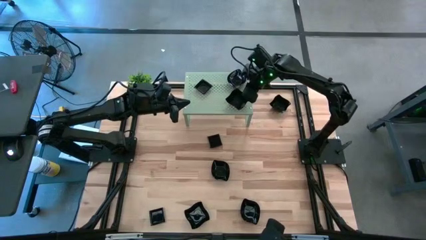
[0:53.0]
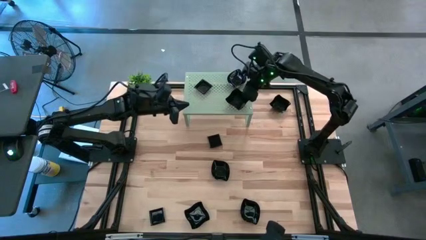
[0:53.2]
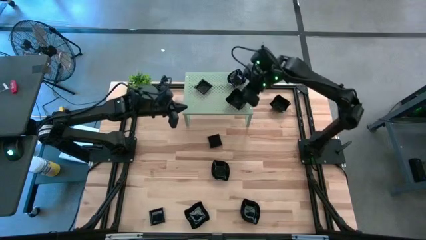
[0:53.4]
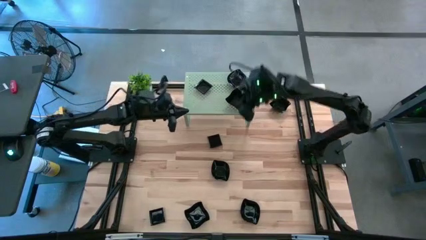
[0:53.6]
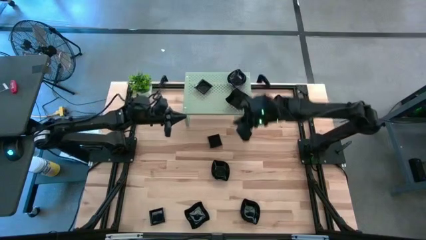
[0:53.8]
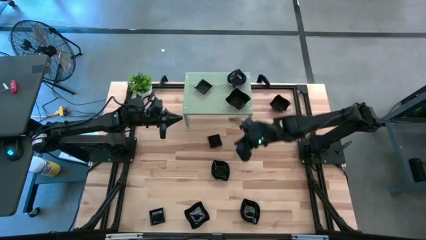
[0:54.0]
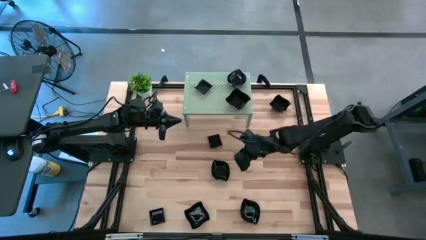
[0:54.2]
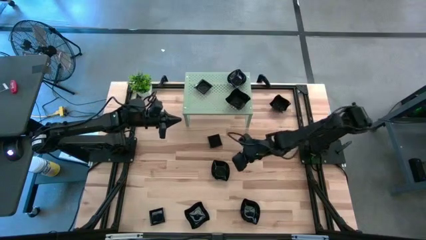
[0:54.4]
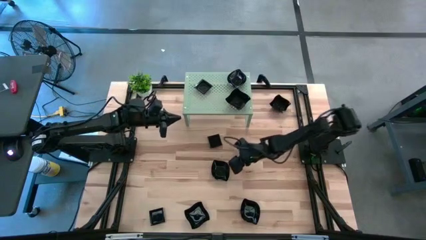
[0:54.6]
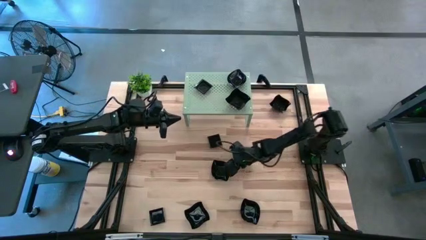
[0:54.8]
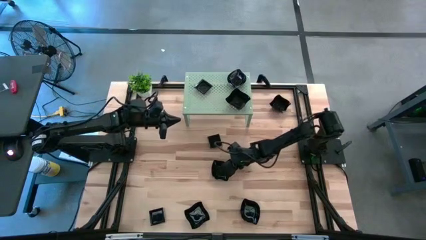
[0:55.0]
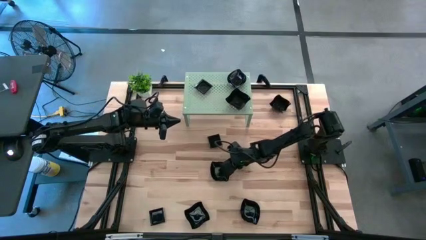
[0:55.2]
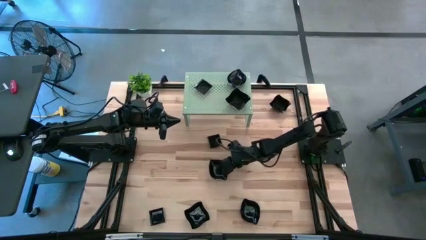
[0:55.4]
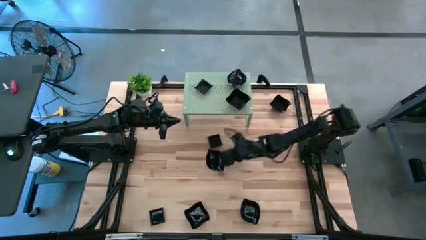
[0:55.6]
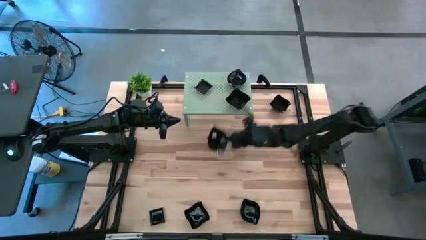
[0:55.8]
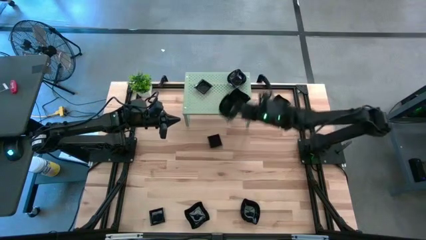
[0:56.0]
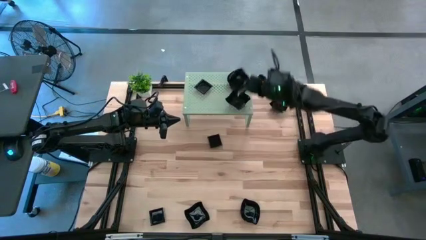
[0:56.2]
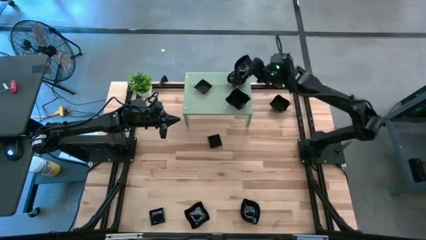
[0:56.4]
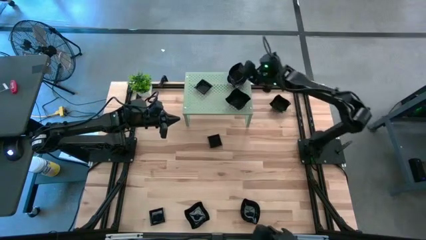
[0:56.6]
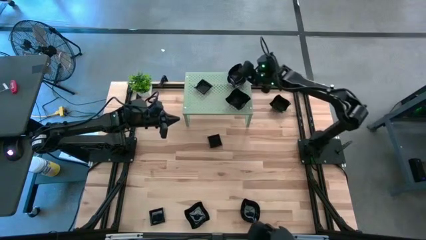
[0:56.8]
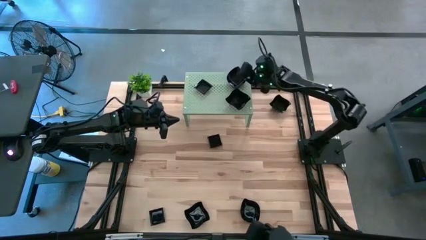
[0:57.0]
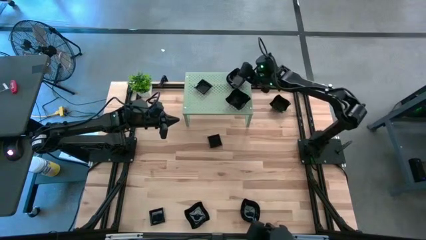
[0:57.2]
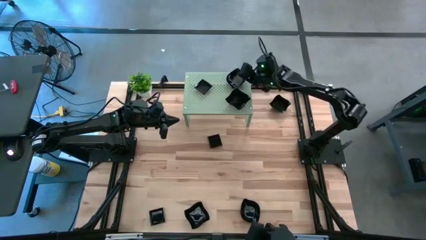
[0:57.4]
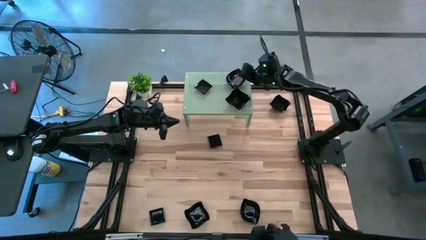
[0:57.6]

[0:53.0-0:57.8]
Task: Pick & Place Mini shaped plates
Stack the black leaf-shaped plate on top of the black leaf-shaped plates on the shelf

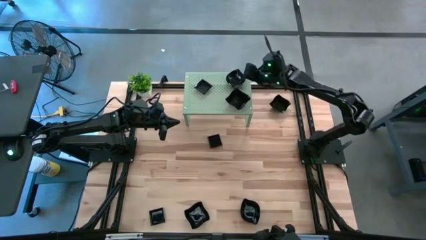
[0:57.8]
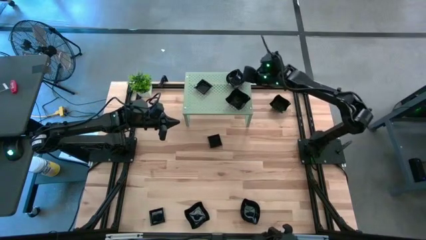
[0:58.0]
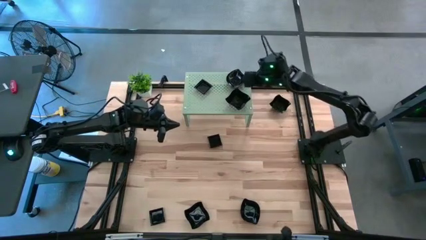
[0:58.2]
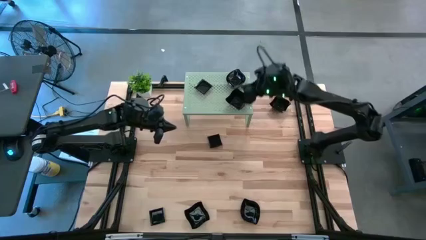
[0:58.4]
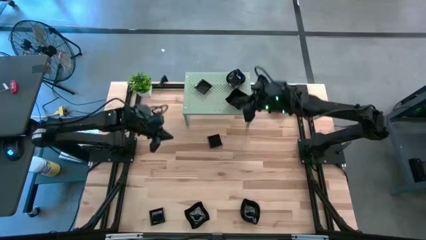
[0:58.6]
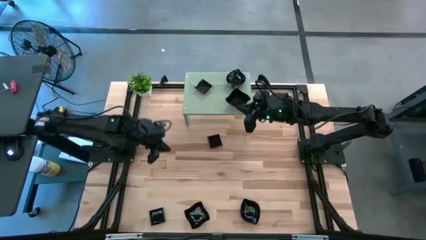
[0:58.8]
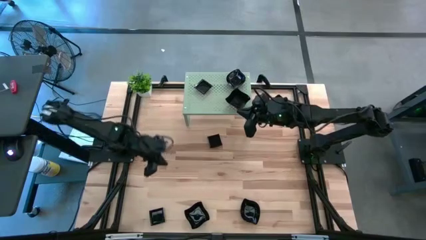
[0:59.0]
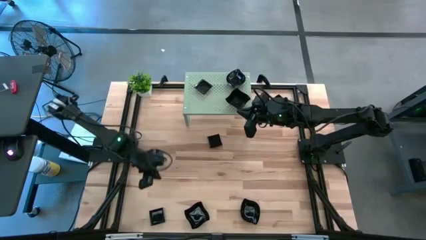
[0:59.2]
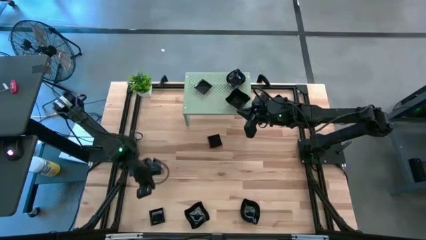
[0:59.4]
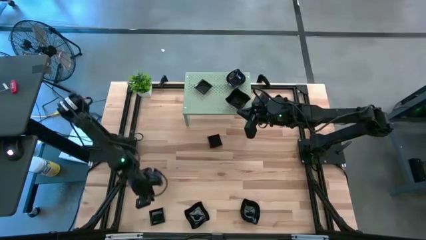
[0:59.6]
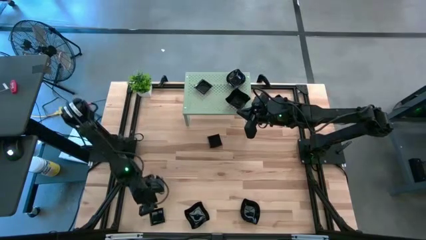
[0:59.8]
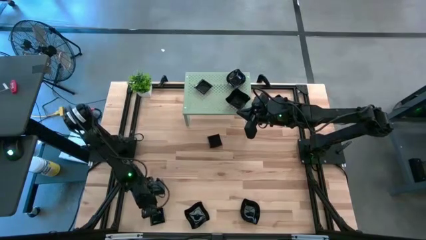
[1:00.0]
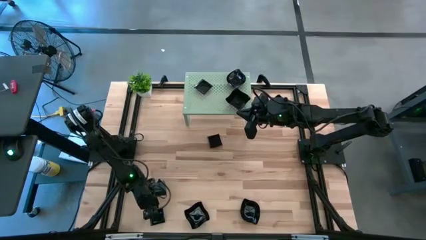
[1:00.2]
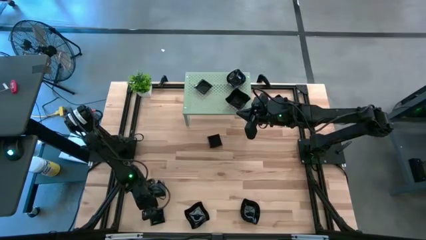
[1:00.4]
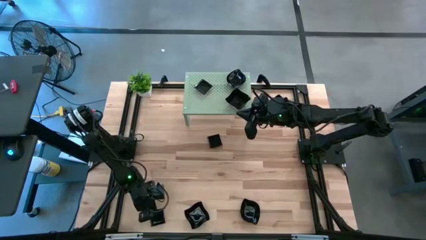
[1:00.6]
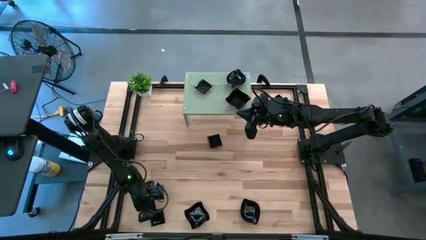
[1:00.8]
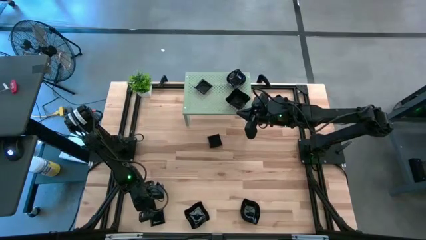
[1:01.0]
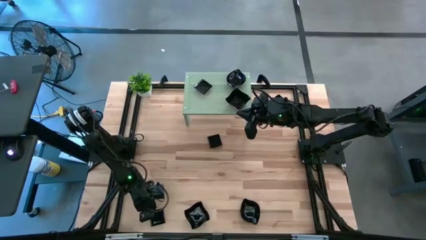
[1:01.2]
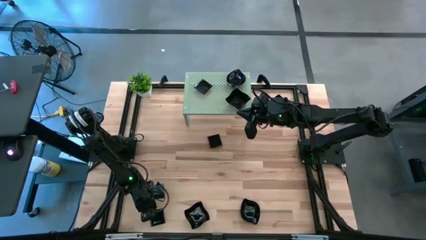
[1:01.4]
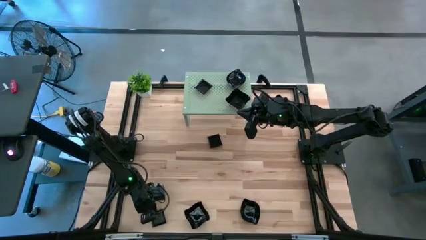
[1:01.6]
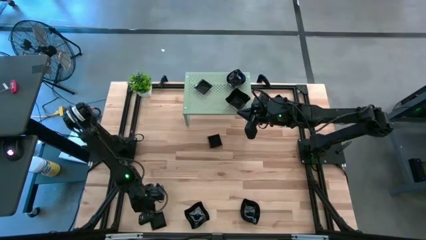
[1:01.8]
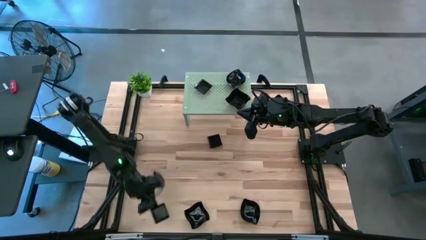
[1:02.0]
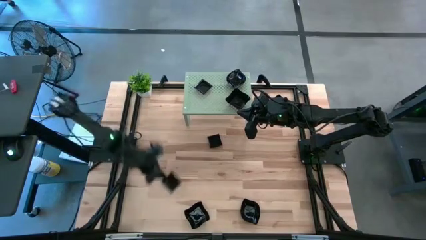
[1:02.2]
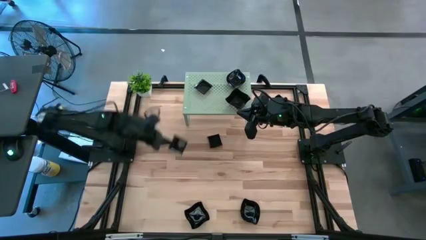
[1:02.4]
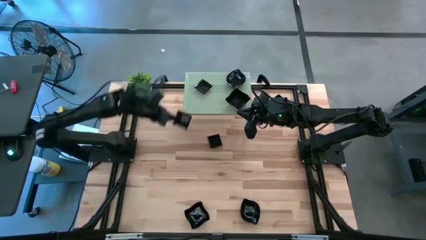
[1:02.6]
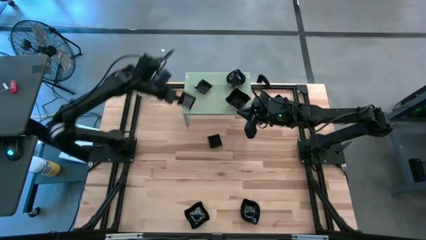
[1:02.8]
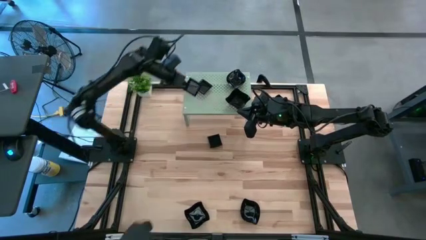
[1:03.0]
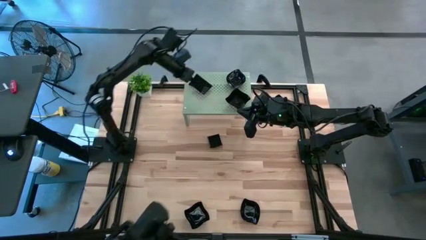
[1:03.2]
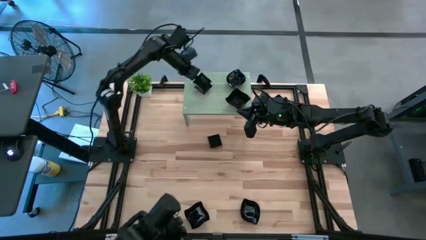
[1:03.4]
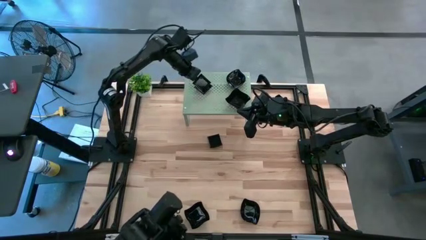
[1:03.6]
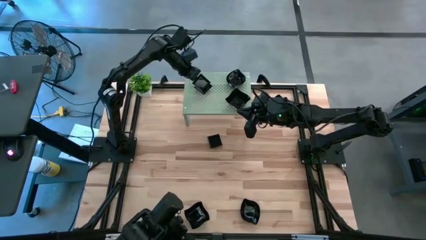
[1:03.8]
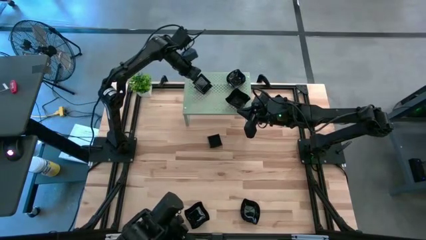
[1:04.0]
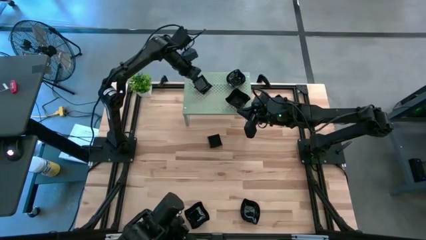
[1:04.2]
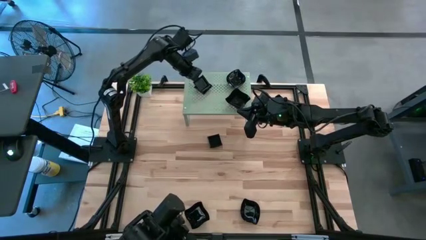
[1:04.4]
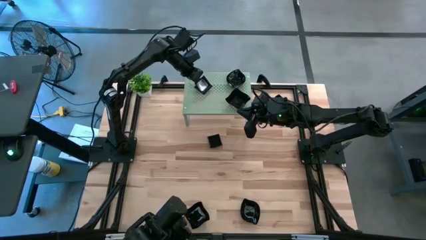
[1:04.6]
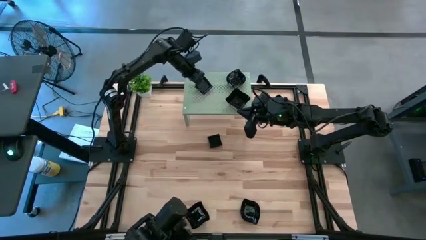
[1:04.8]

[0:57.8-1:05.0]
Stack the black square plate on top of the black square plates on the shelf

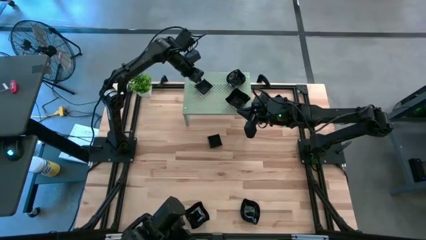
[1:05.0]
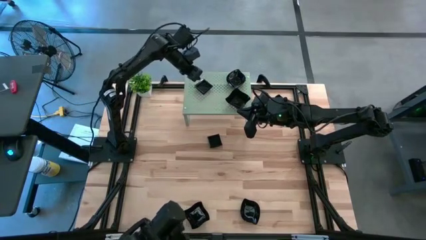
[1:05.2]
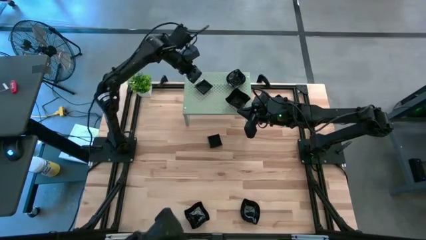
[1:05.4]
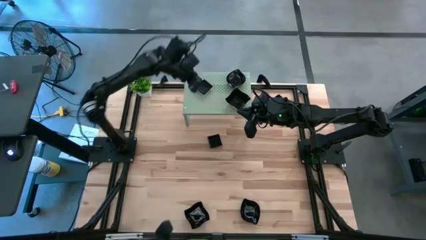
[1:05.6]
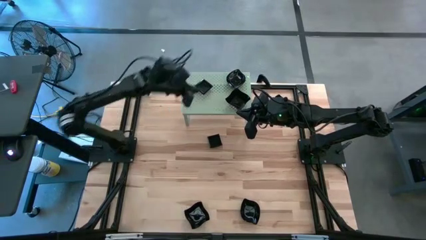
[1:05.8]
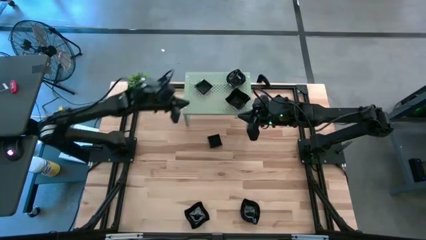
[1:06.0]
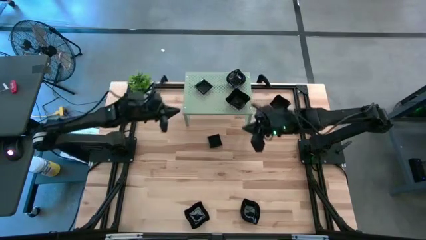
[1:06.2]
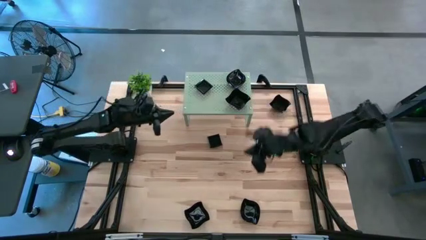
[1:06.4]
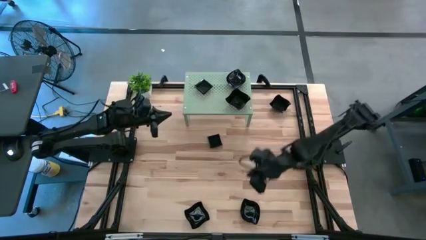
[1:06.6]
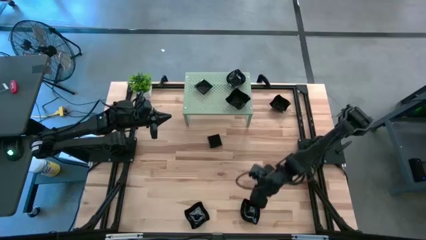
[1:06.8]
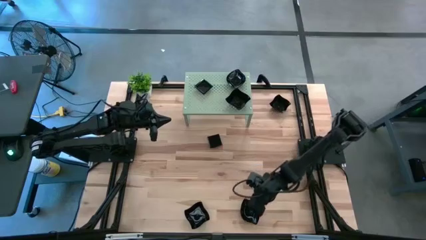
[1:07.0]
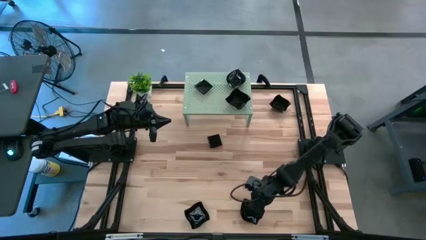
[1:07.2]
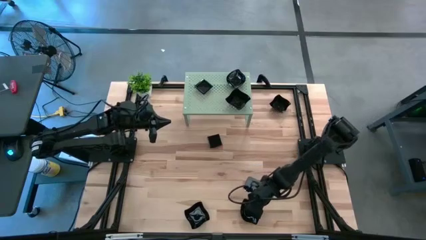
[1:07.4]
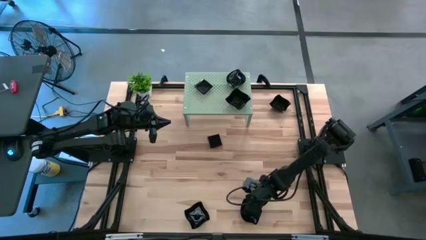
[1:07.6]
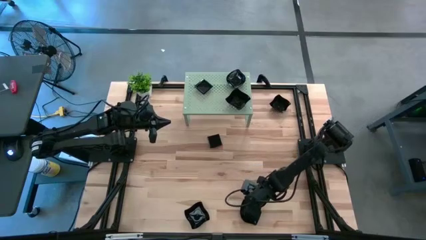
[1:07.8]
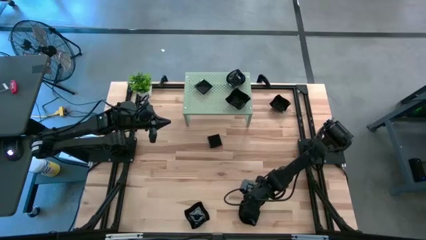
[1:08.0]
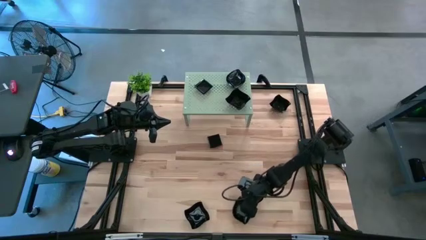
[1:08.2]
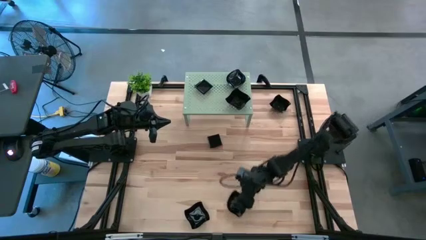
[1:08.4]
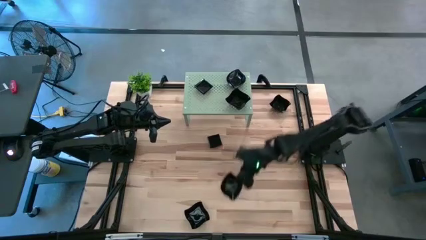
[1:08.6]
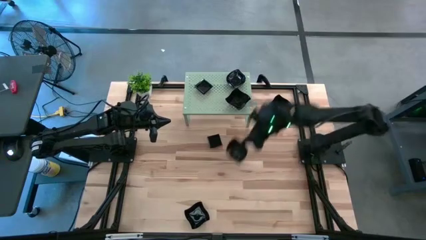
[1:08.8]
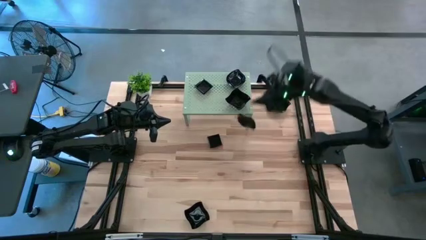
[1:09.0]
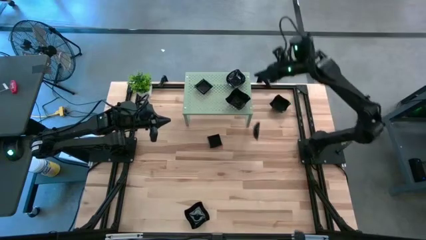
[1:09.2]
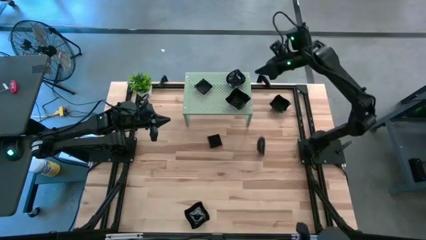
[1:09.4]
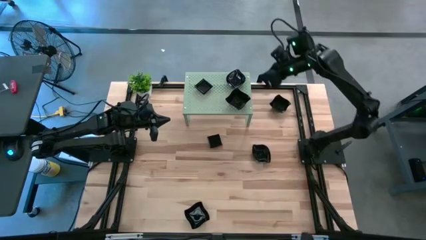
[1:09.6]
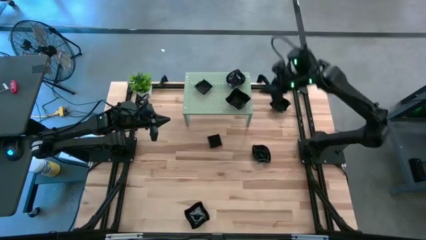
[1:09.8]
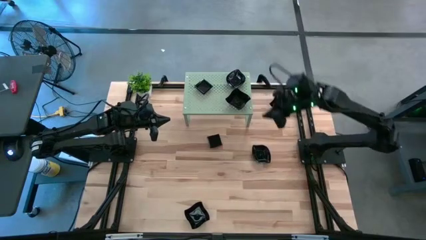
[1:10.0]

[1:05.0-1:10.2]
Stack the black leaf-shaped plate on top of the black leaf-shaped plates on the shelf
